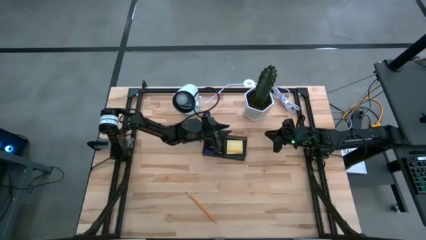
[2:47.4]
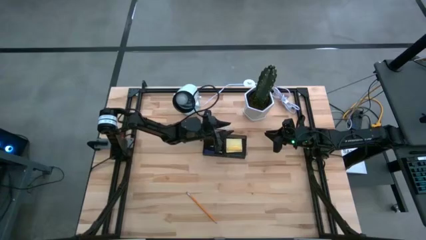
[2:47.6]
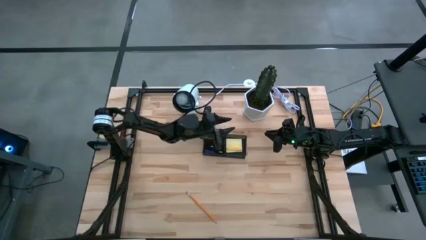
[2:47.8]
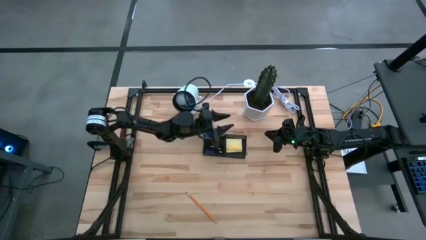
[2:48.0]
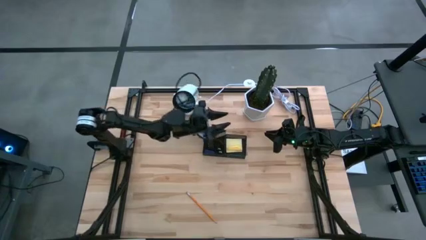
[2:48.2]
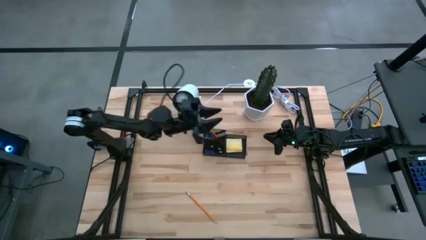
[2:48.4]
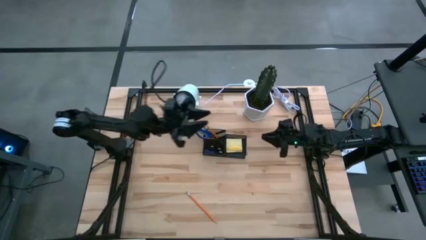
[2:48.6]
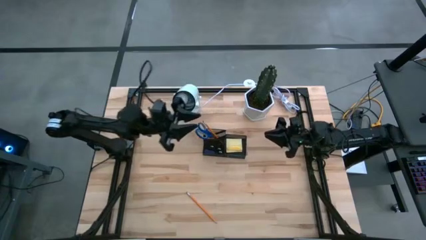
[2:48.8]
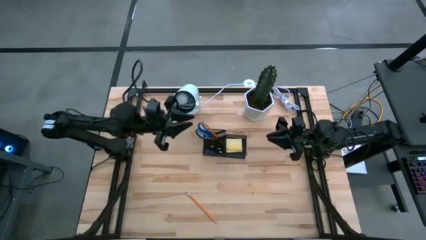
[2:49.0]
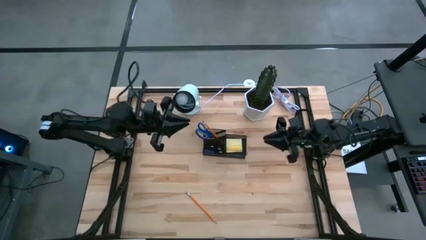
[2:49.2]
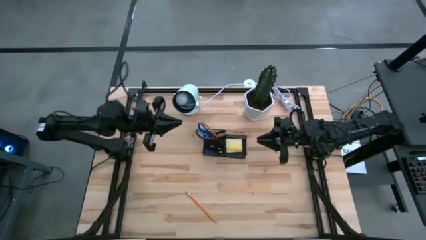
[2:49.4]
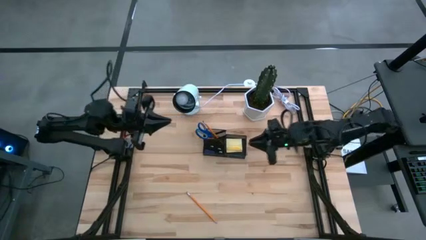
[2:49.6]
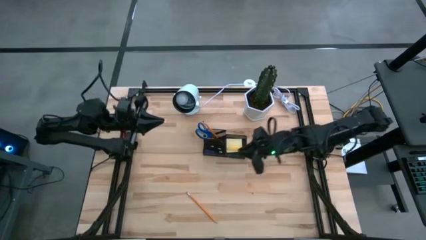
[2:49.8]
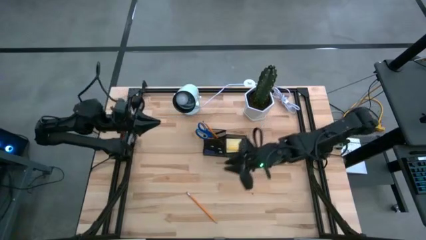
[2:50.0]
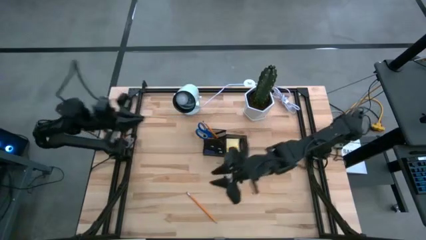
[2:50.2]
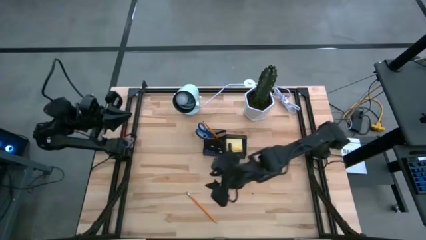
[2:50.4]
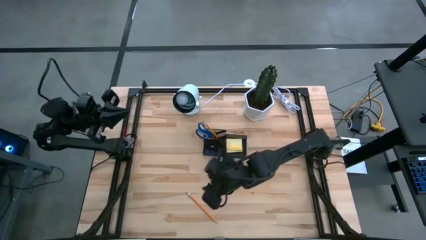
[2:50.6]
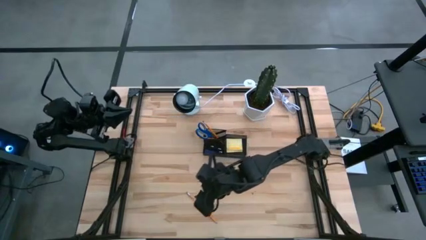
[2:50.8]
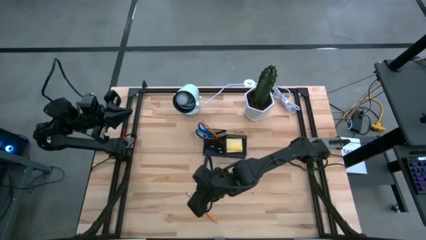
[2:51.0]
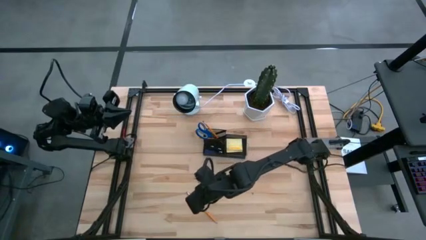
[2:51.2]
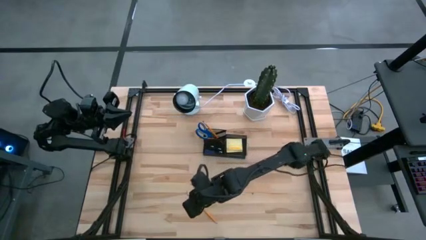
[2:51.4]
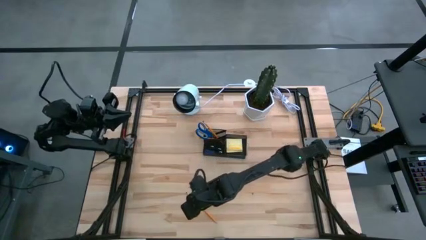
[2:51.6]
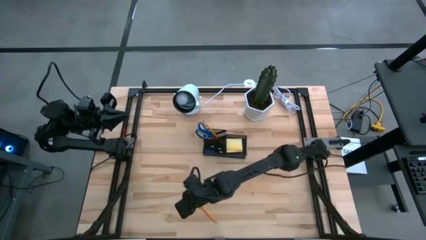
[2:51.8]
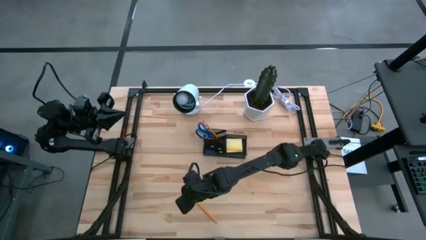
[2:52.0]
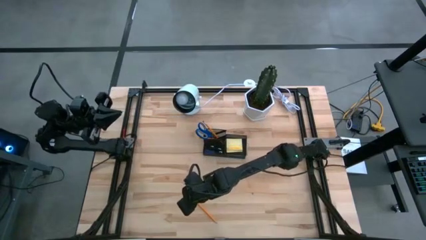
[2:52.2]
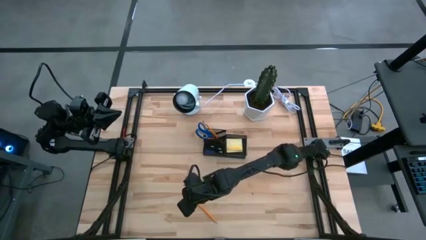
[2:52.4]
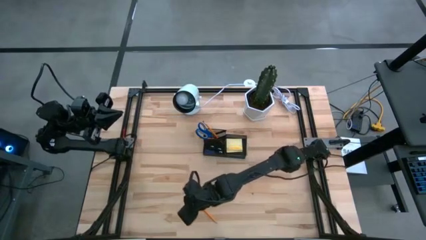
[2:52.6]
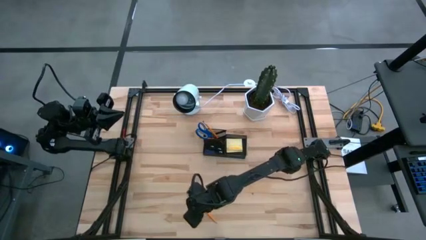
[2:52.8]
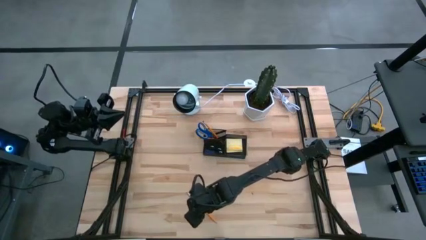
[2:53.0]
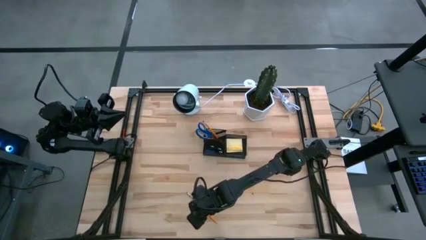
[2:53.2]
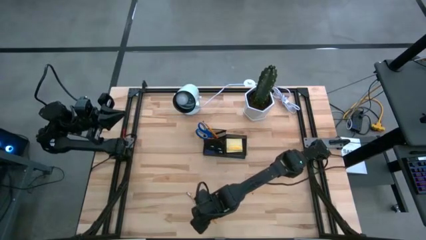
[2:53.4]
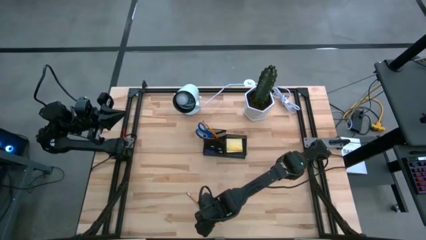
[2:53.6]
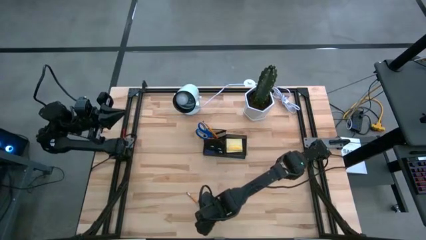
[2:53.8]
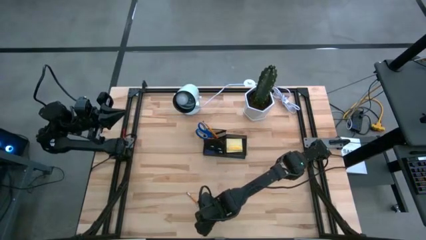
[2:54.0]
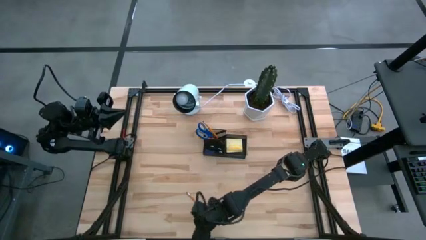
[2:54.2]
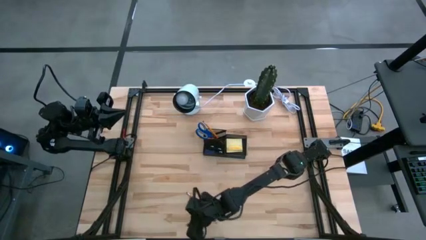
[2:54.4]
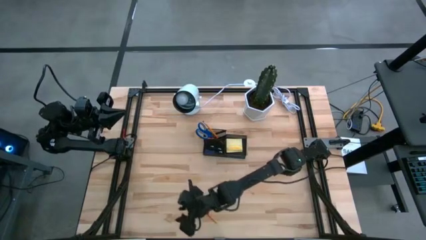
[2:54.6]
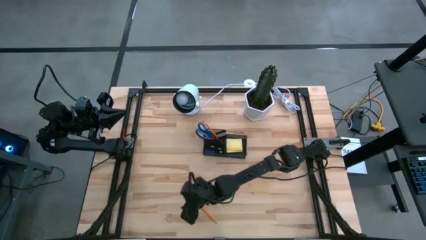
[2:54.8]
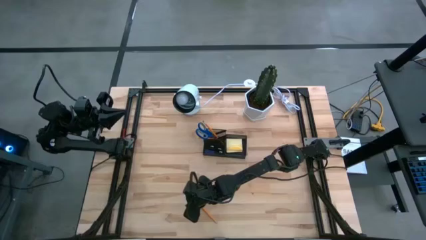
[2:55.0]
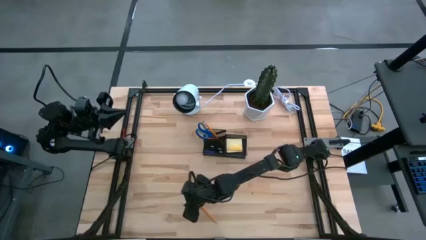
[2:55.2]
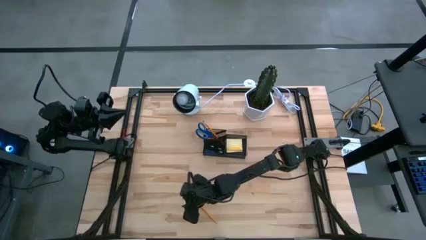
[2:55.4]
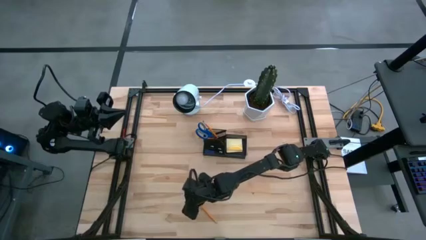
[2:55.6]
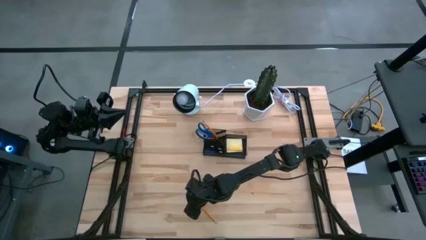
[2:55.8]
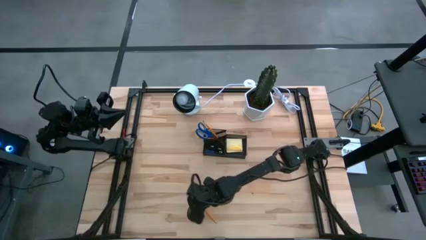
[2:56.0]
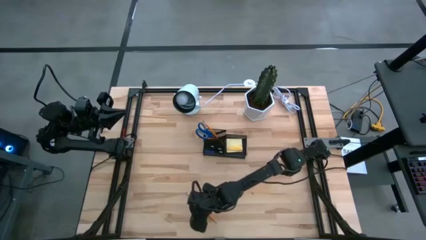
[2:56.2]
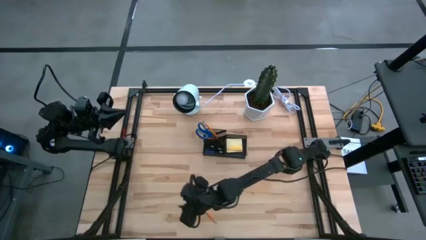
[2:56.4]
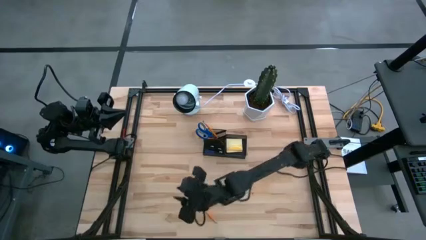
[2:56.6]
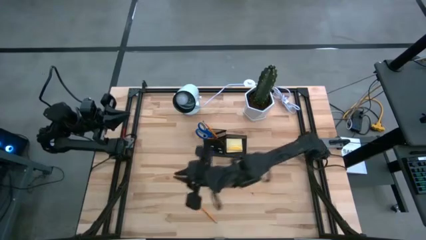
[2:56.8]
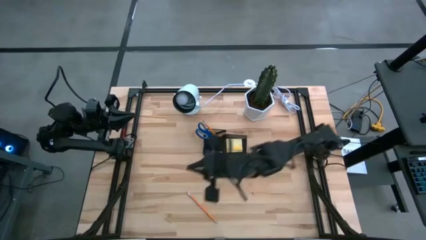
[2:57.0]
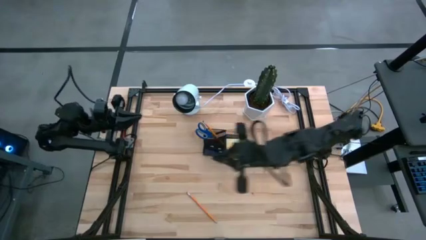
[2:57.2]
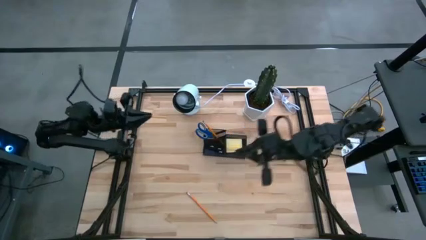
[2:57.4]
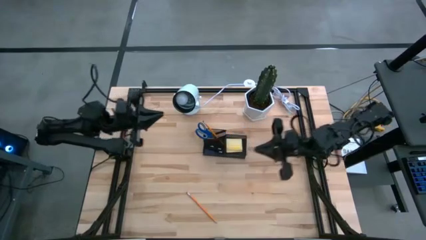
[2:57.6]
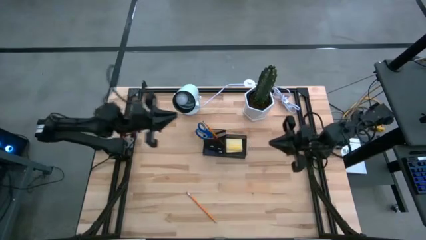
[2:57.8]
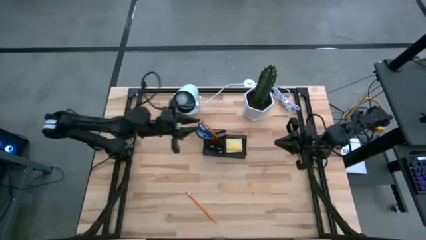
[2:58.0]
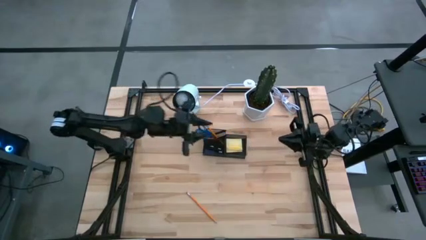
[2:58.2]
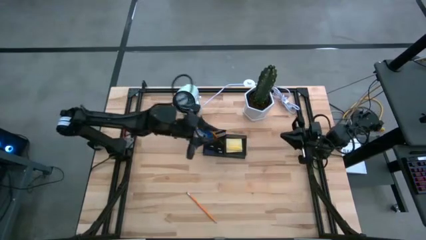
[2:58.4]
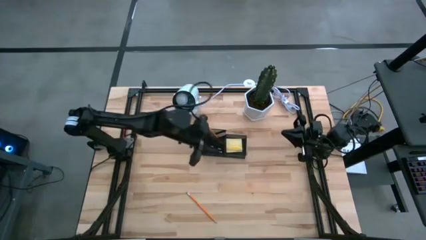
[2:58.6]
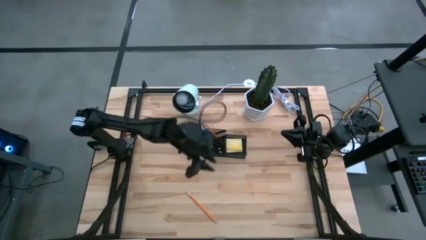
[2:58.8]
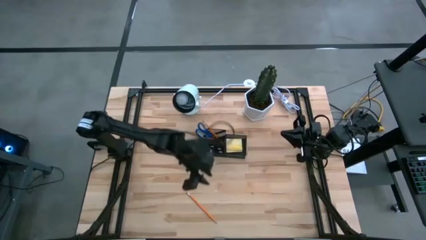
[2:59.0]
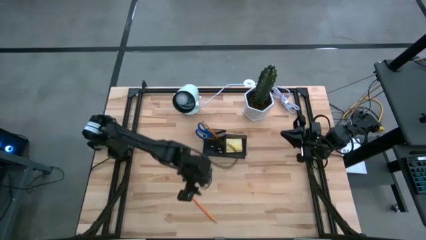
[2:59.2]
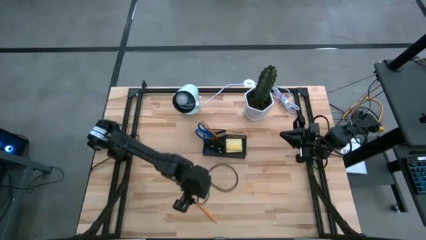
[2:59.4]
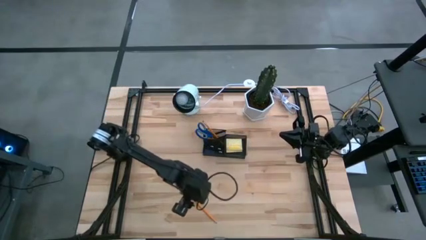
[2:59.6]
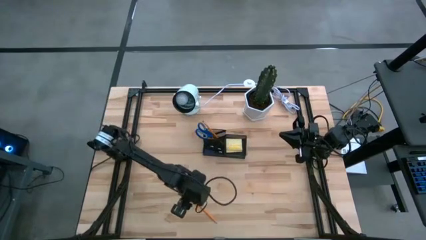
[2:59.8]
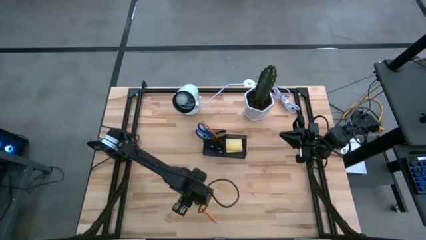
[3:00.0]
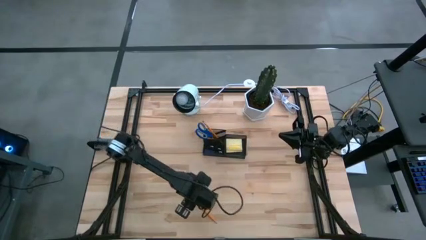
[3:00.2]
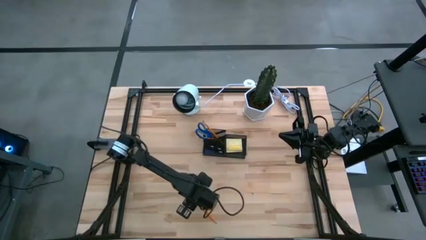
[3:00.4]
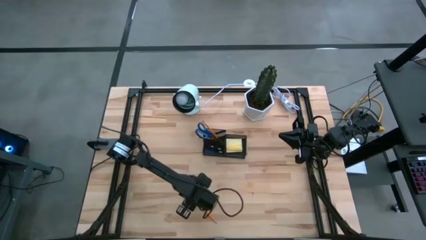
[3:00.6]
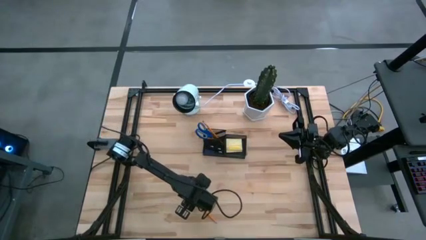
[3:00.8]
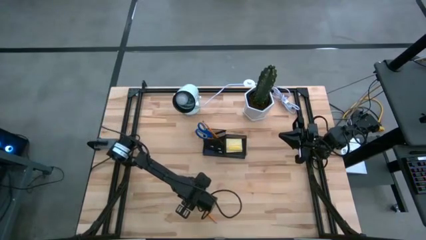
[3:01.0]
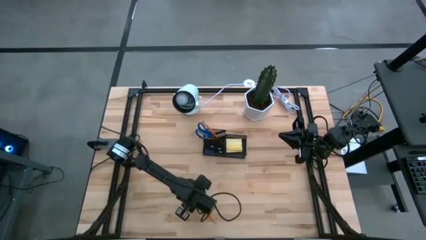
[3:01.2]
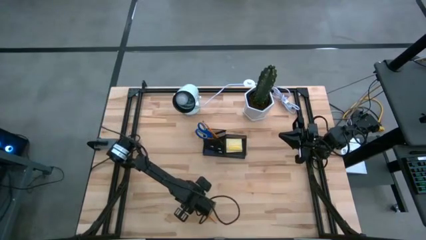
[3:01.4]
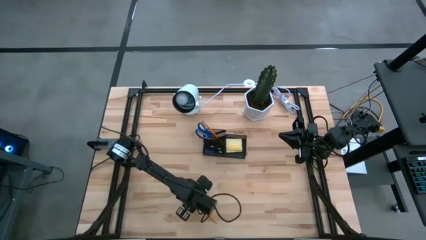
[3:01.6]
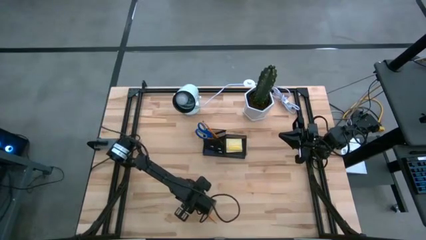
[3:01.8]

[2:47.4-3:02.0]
Task: Pick and place office supplies into organizer
Put the yellow pencil into the black desk organizer
